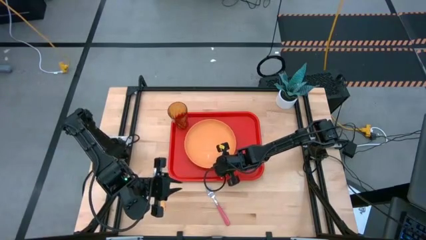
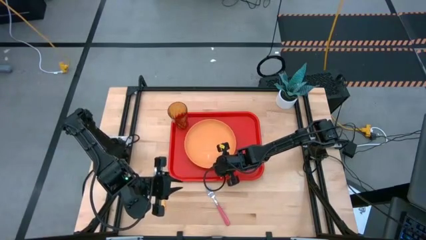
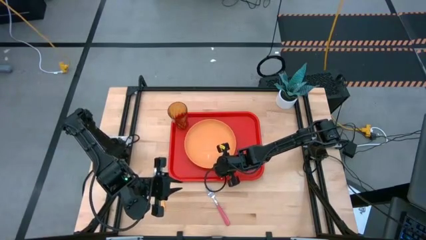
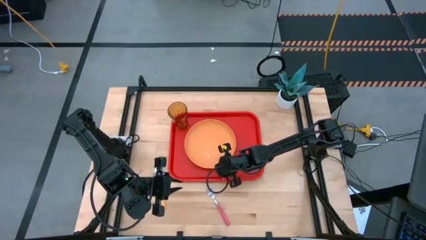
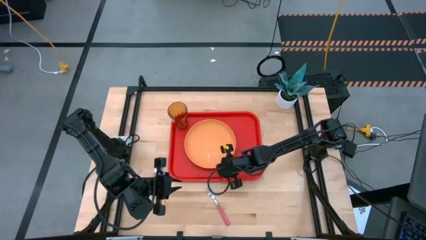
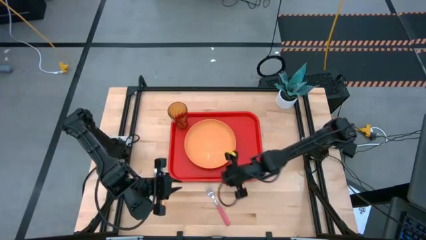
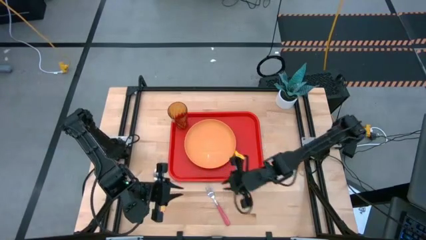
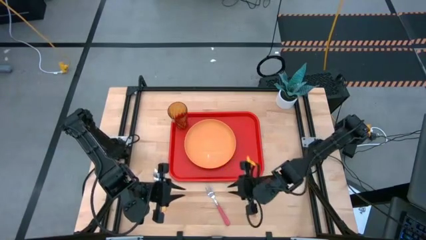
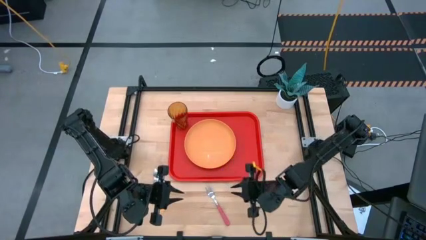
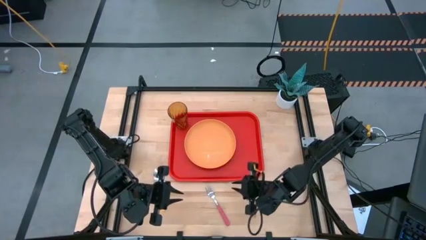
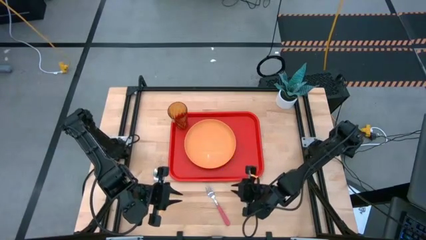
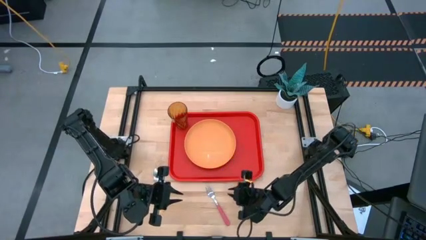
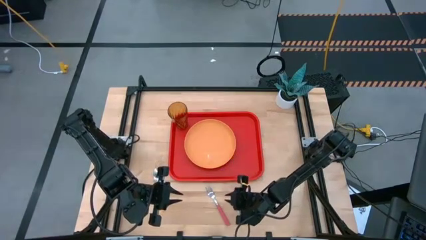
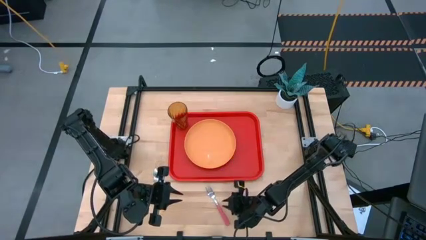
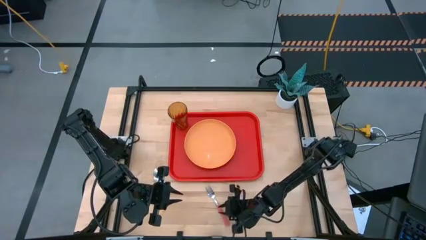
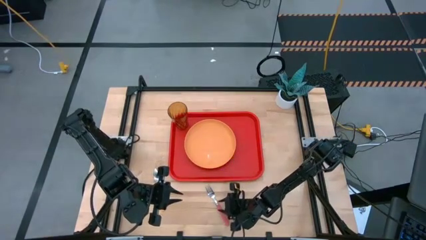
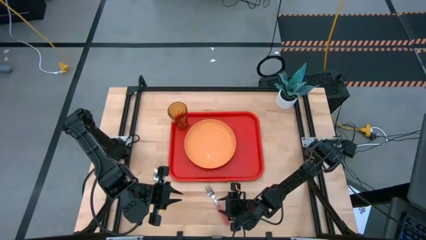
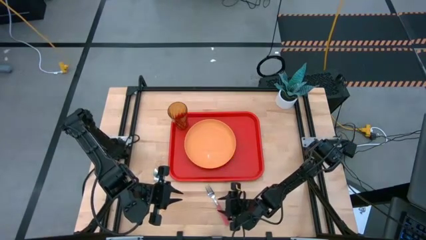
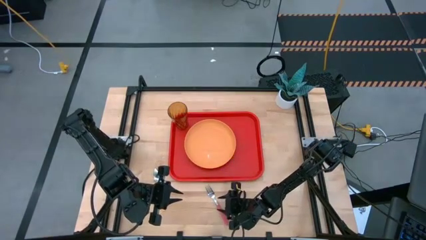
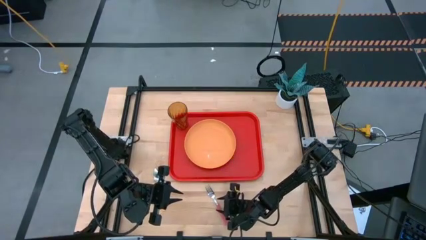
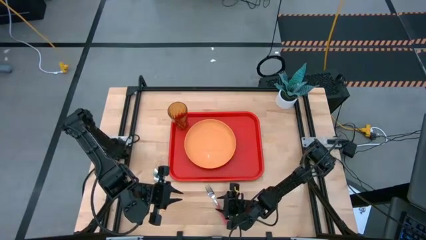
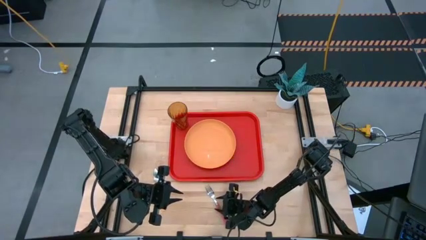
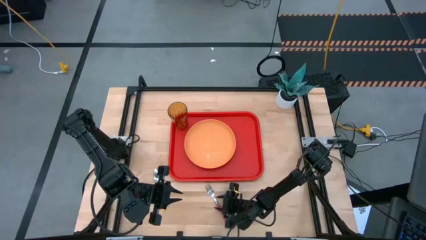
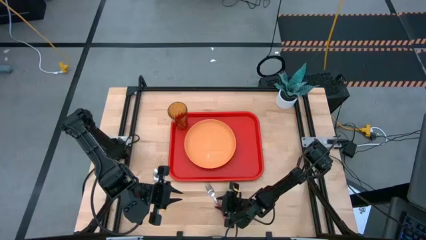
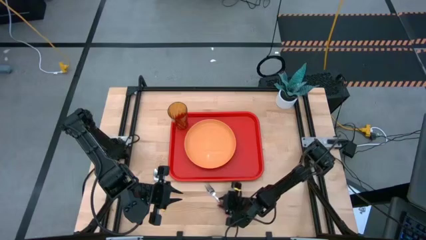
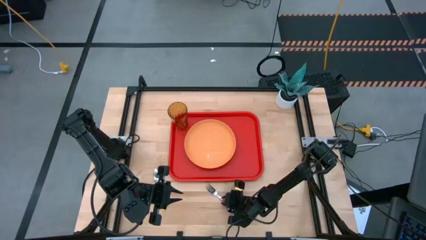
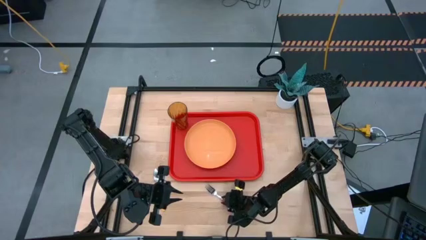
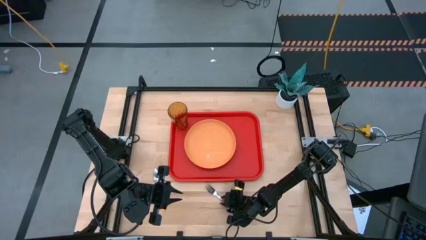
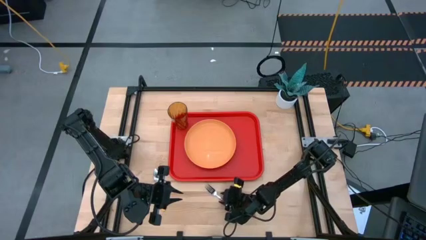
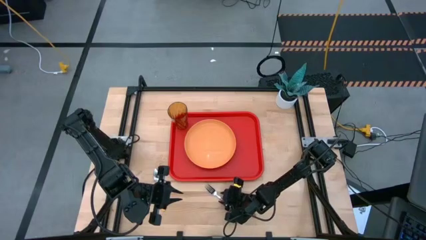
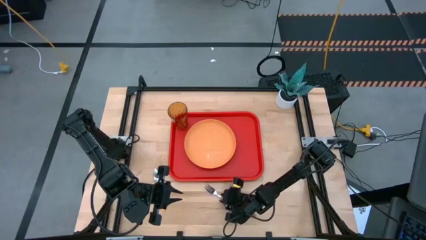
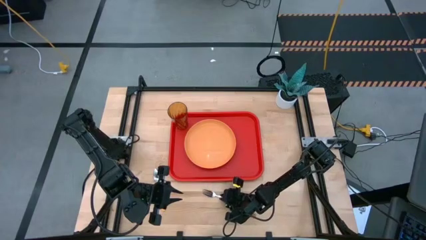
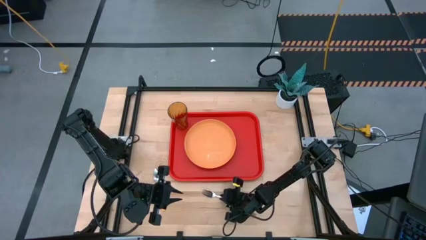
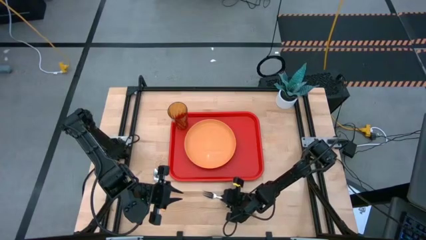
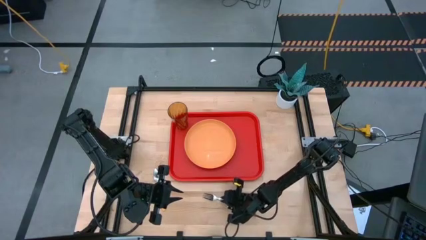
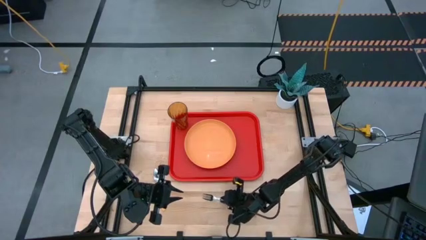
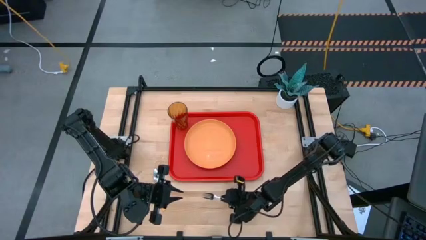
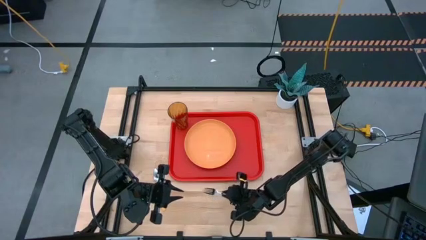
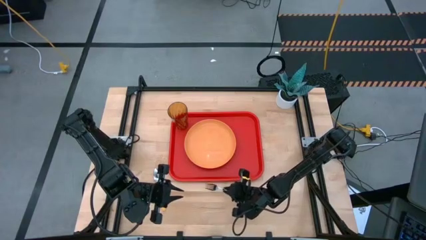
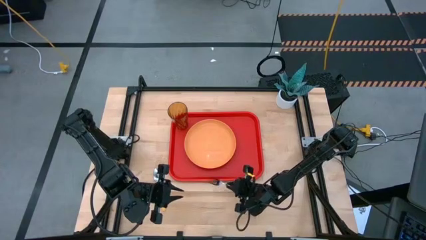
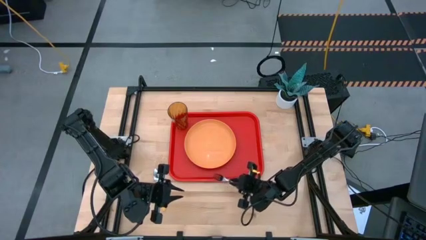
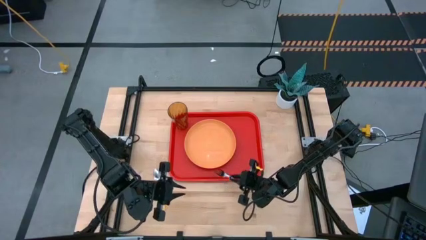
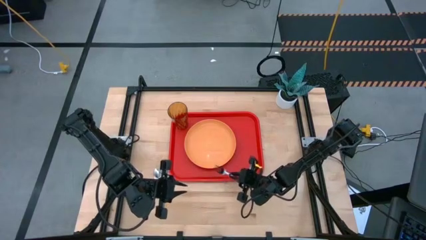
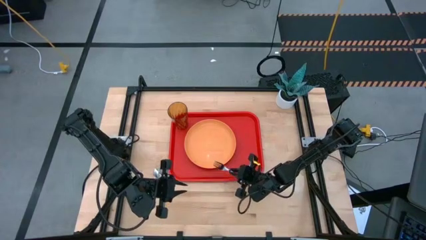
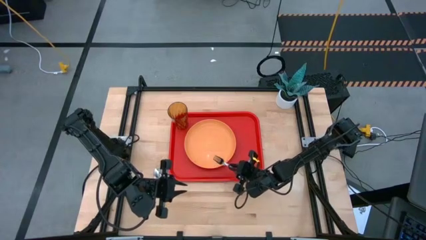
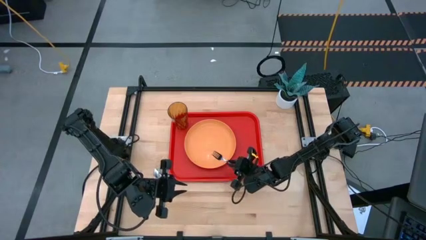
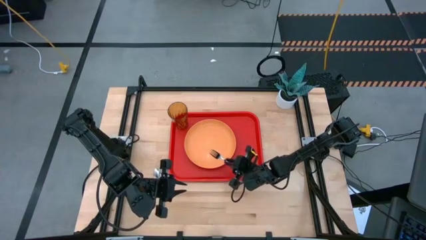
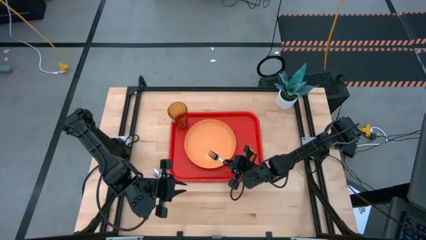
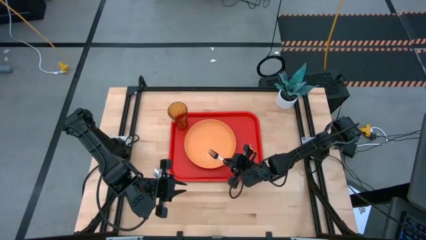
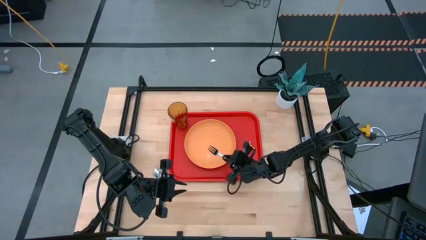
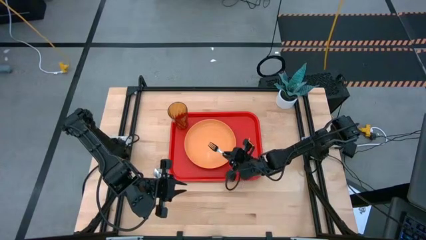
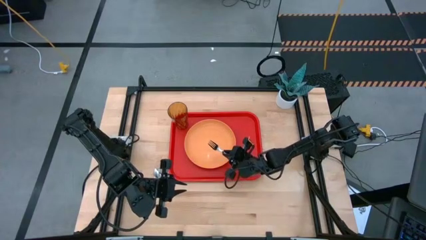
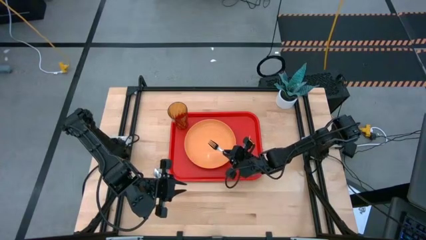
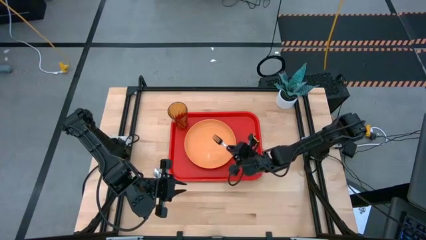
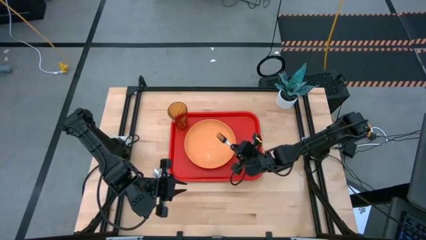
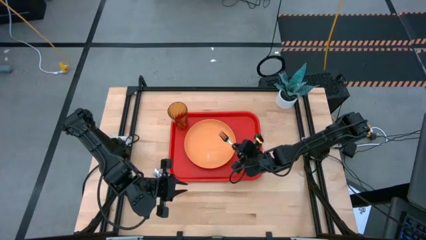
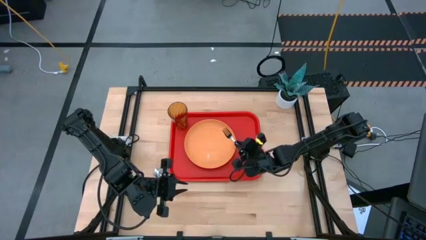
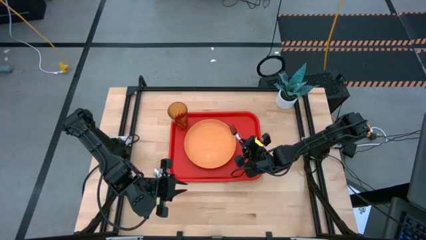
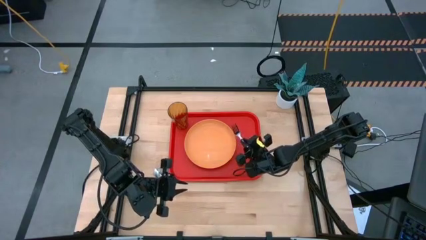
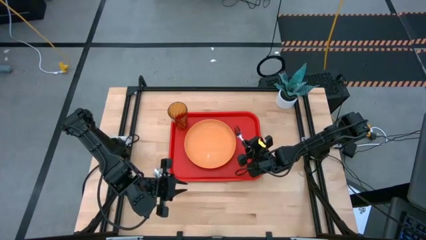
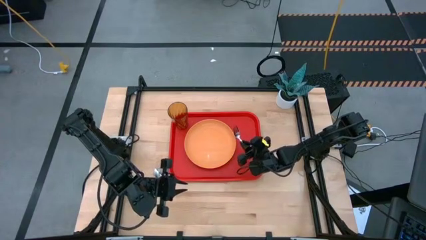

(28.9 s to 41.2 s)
Task: Pick and place plate/cup/fork/spoon on tray
Put the pink fork on the red tray to the right of the orange plate

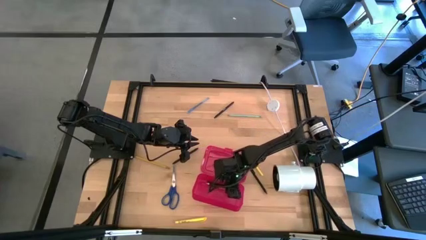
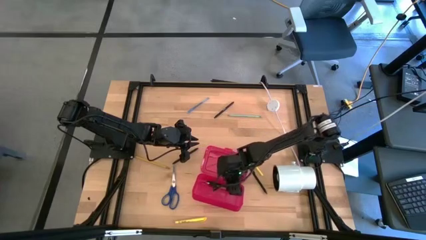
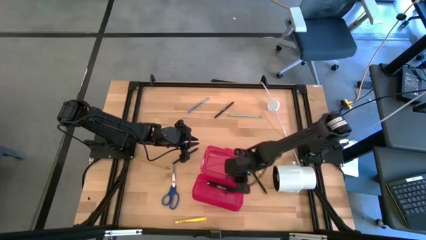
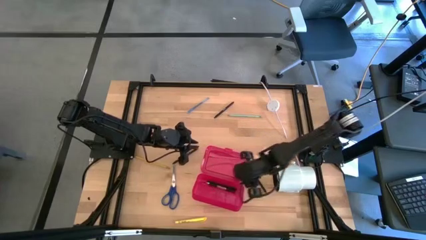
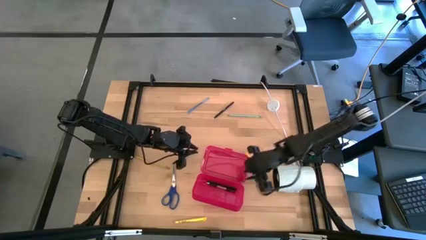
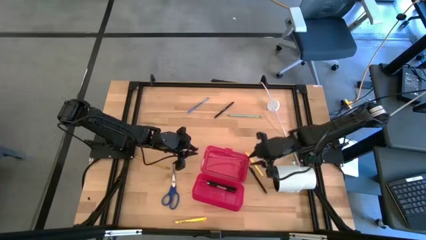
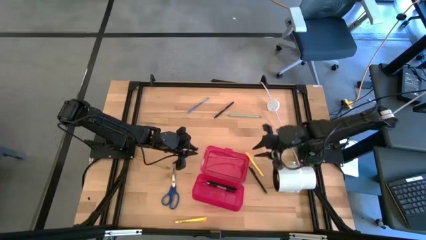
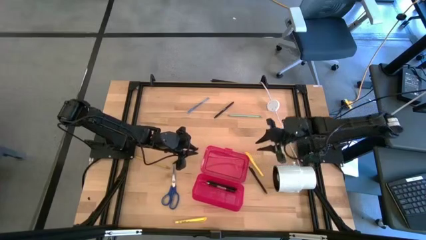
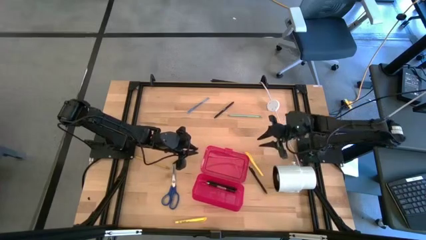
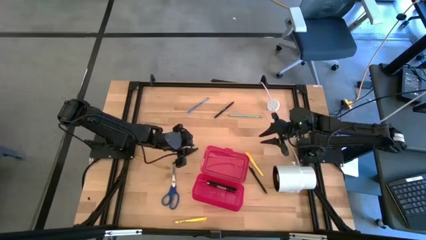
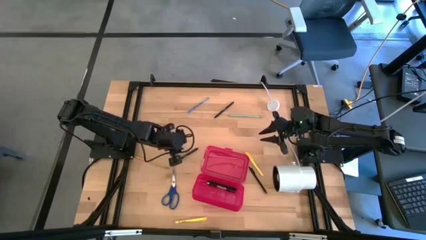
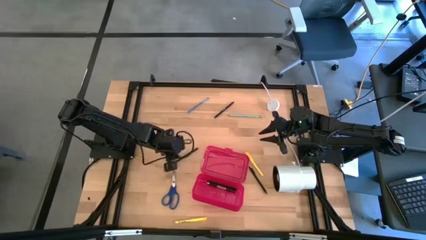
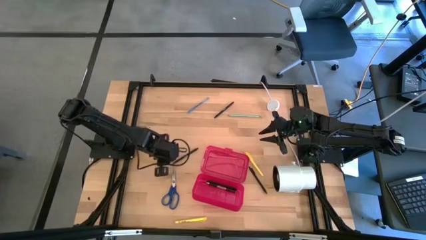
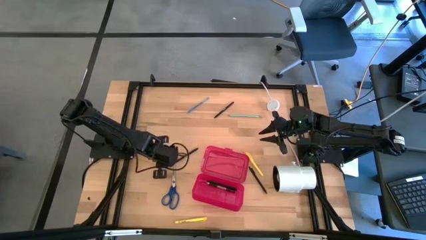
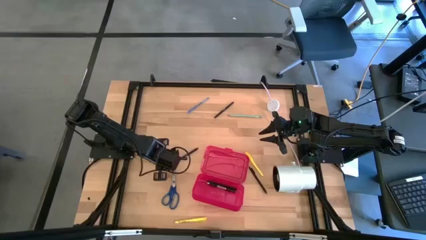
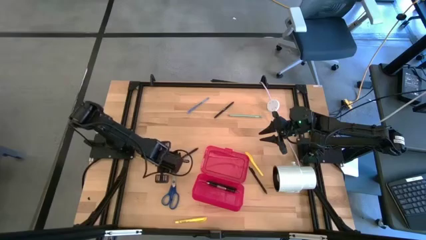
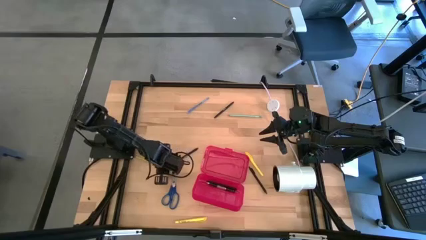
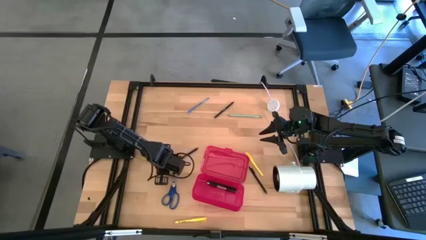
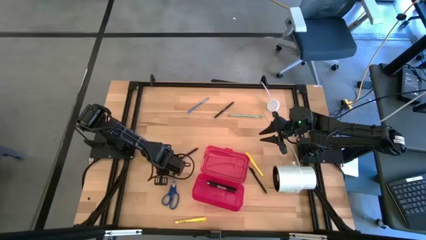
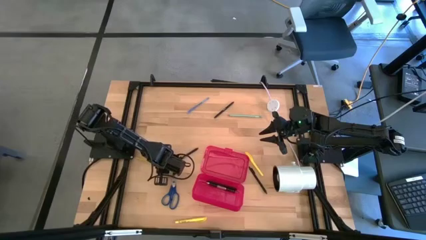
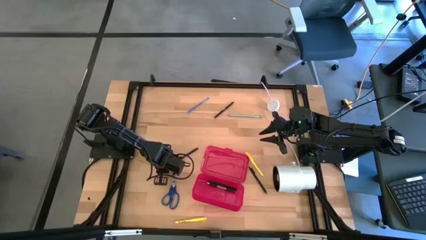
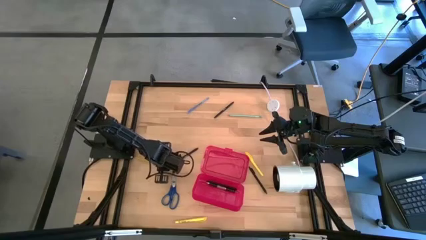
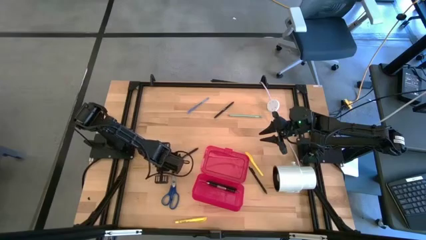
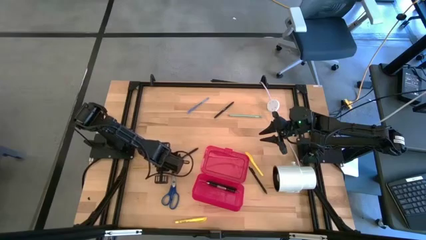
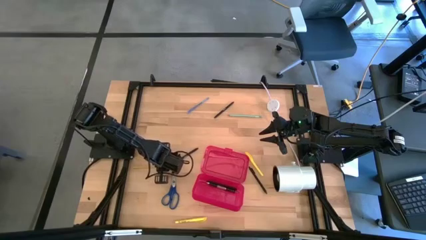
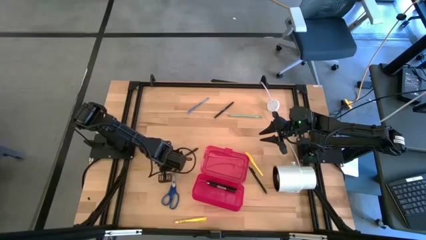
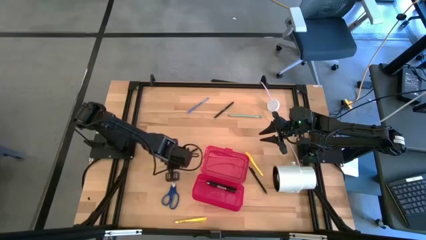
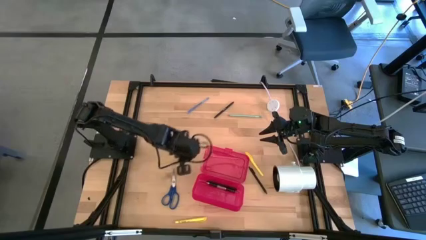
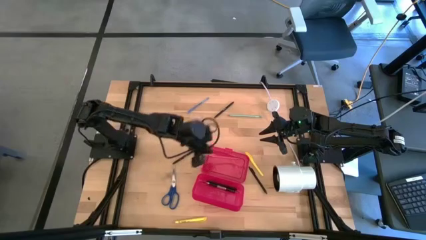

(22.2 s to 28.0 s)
Task: Pick & place school supplies into a supply box
Put the yellow pencil into the red supply box
